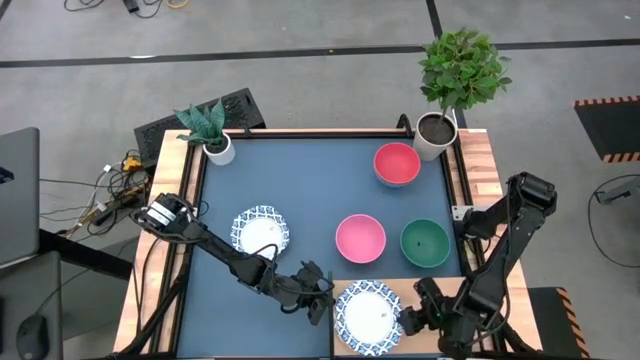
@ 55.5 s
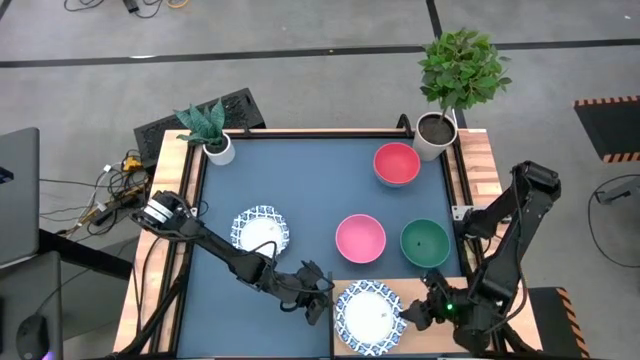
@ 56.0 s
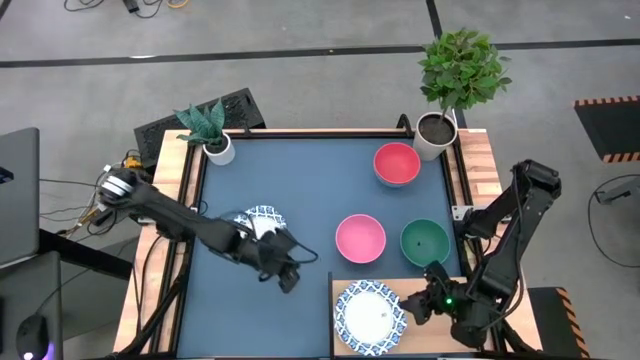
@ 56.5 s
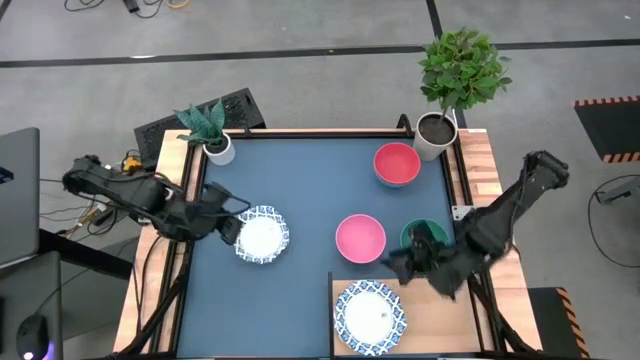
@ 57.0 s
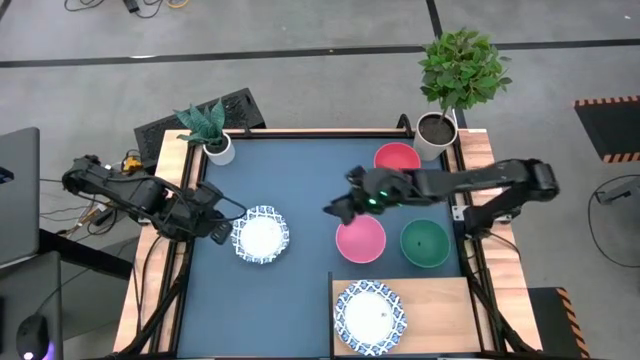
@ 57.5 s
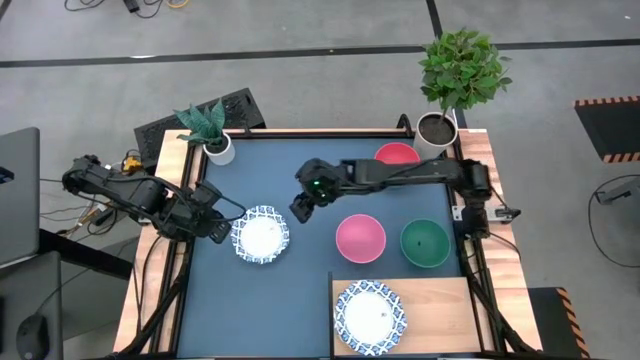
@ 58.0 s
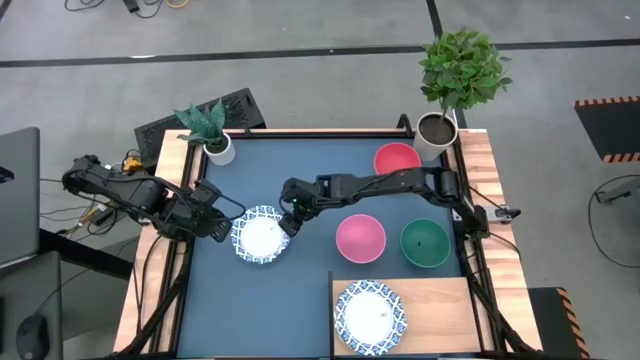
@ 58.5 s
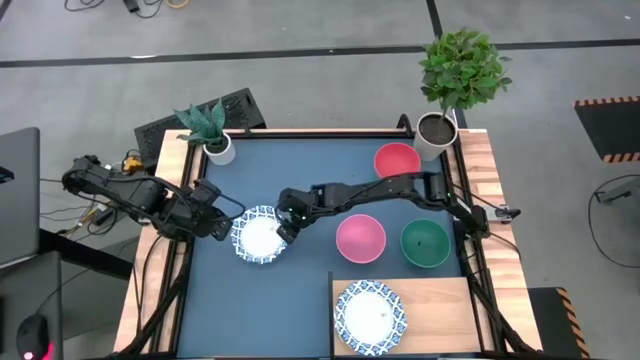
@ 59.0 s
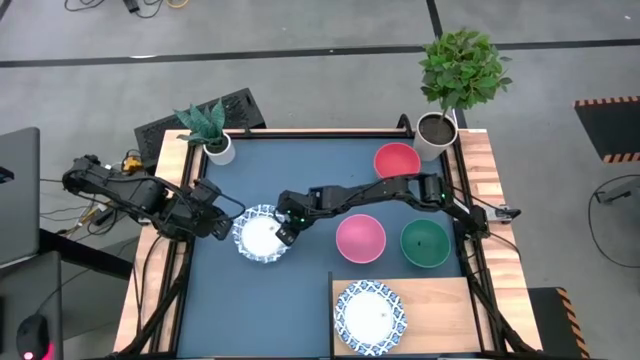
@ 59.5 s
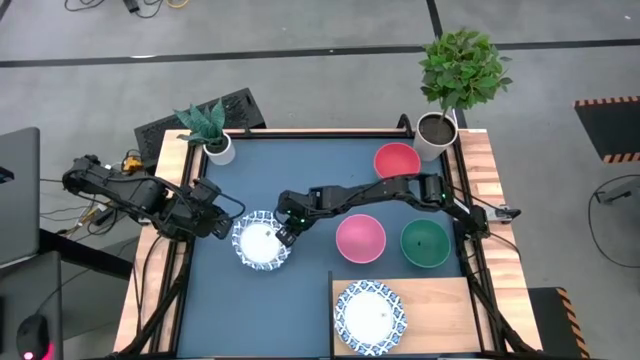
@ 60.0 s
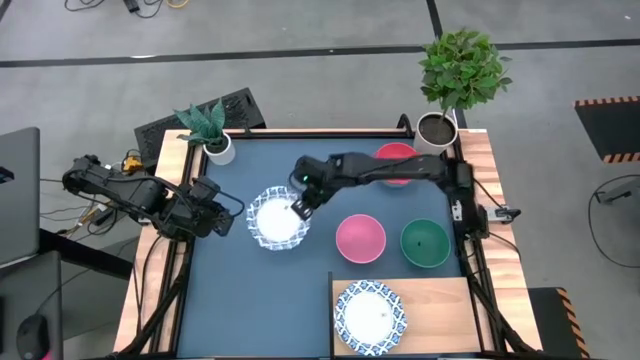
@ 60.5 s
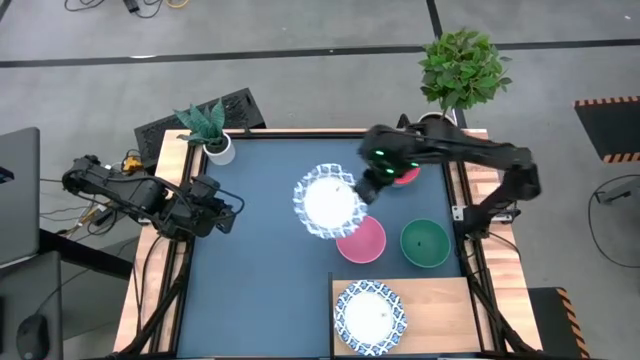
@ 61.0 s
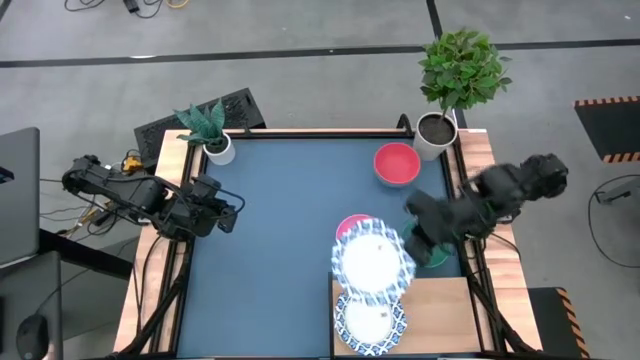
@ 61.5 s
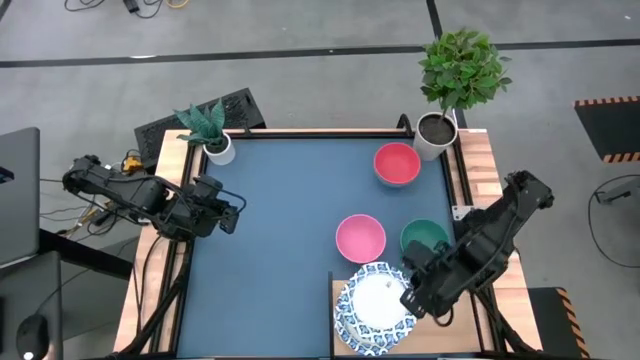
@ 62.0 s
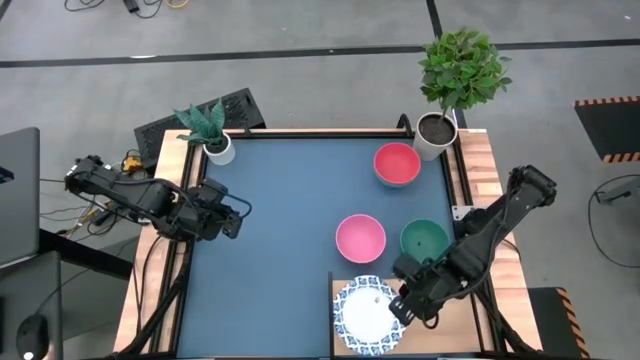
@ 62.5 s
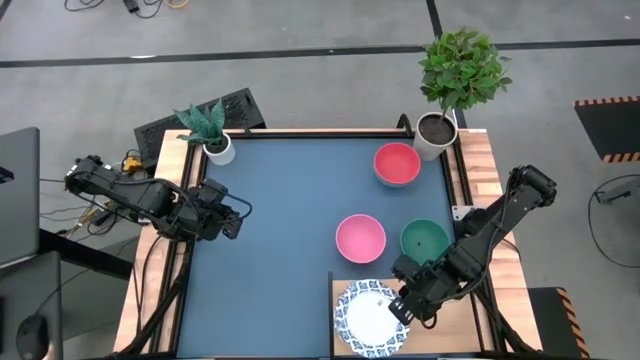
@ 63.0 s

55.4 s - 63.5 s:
Task: Place and stack bowls onto a shelf
Stack the white patterned bowl on the white patterned bowl on the shelf

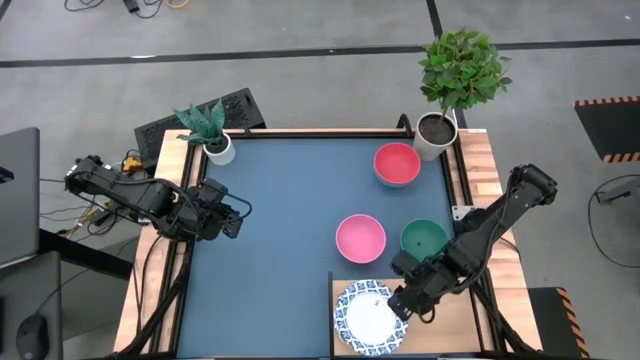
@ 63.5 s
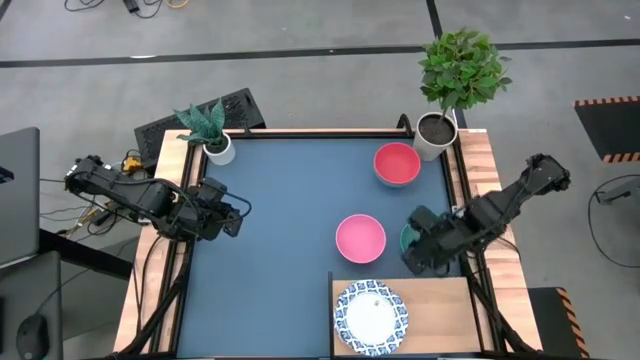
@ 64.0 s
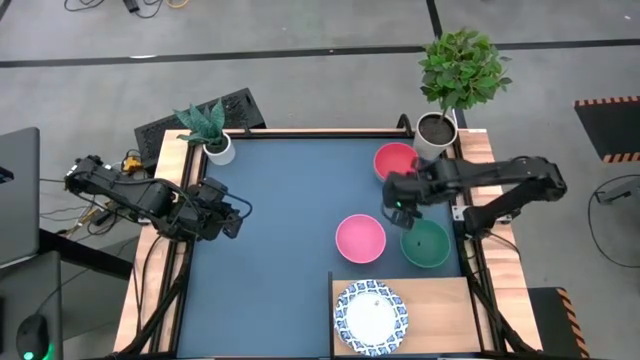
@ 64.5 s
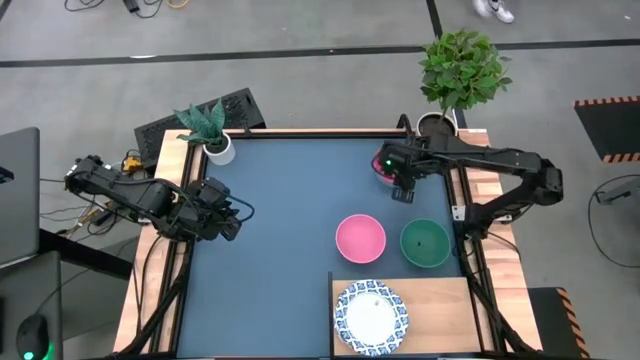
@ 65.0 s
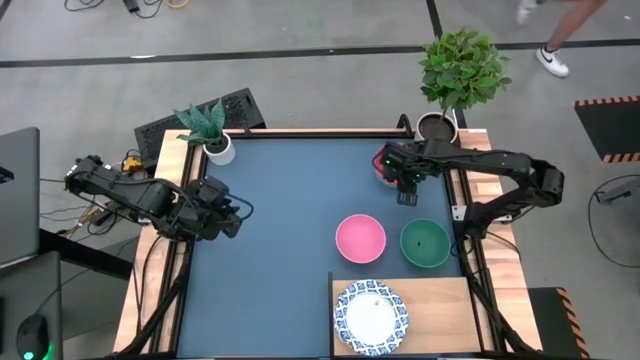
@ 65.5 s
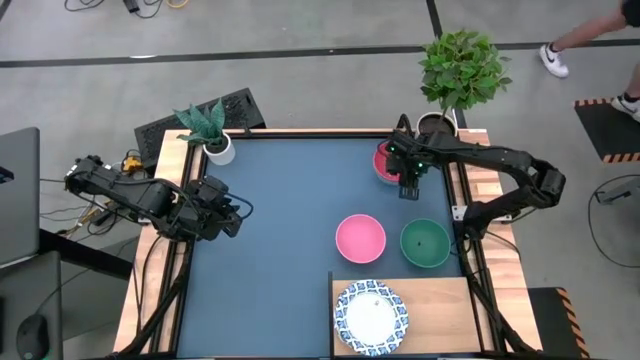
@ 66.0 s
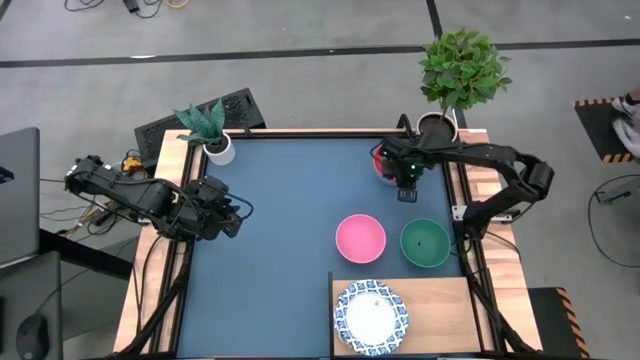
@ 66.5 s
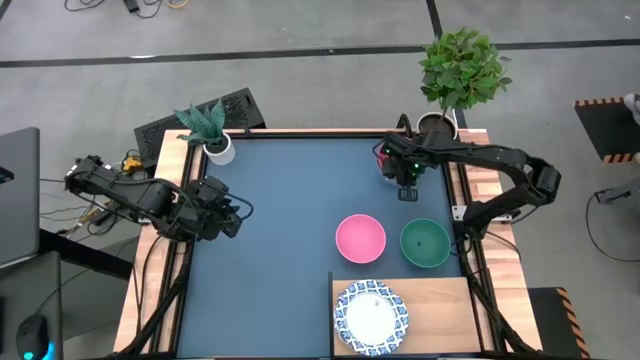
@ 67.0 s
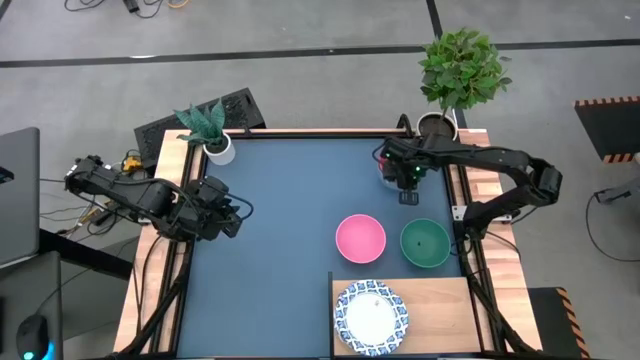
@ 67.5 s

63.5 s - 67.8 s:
Put the orange bowl on the shelf

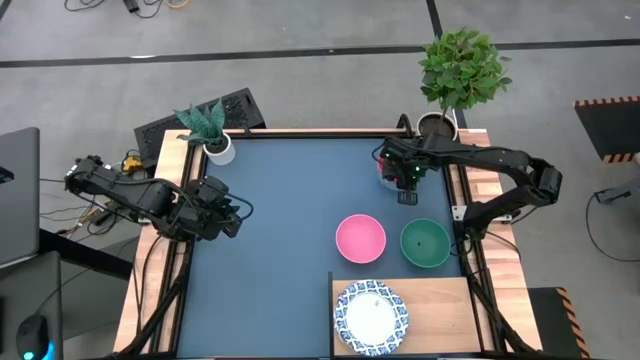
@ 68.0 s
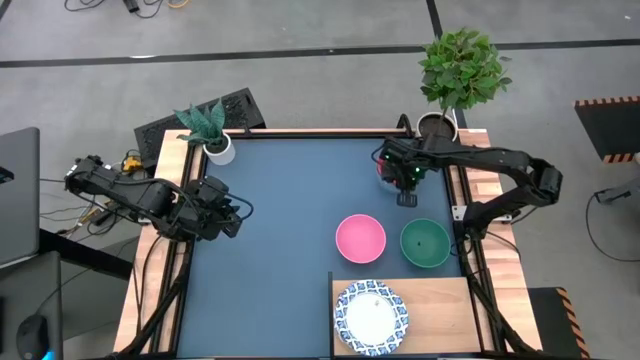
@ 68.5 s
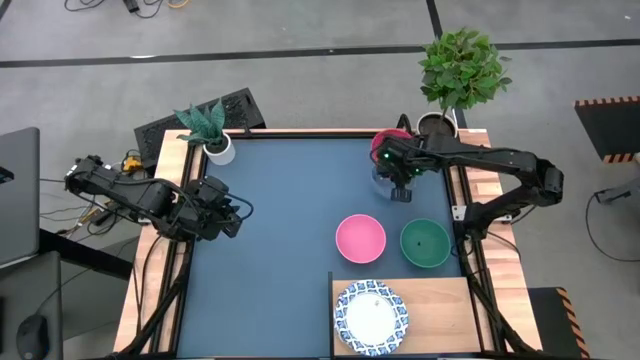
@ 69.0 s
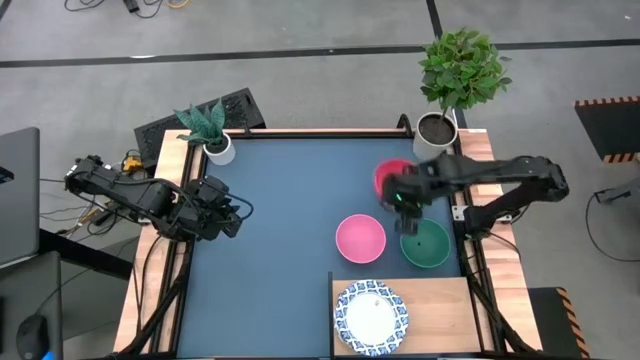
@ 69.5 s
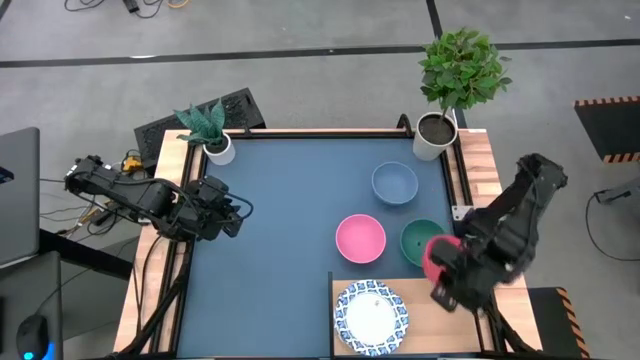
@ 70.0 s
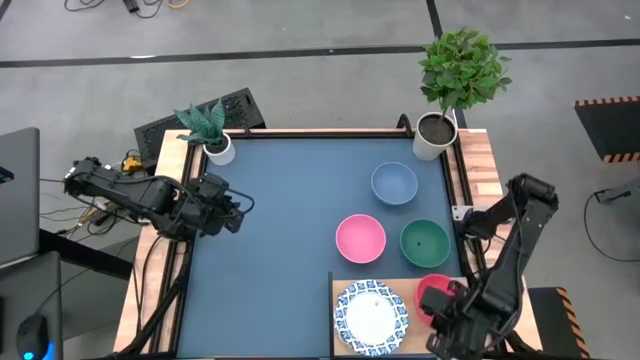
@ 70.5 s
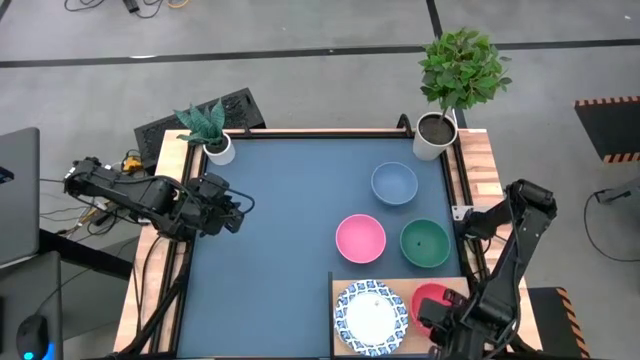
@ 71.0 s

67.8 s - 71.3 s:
Put the orange bowl on the shelf

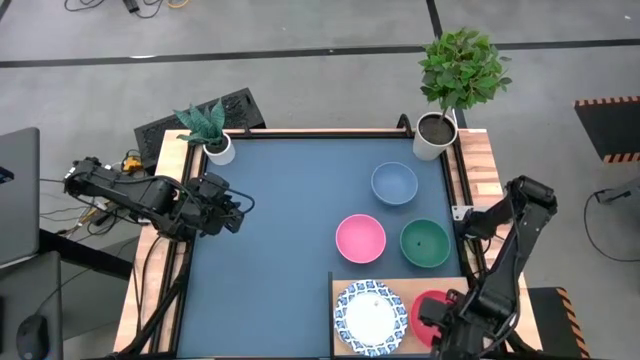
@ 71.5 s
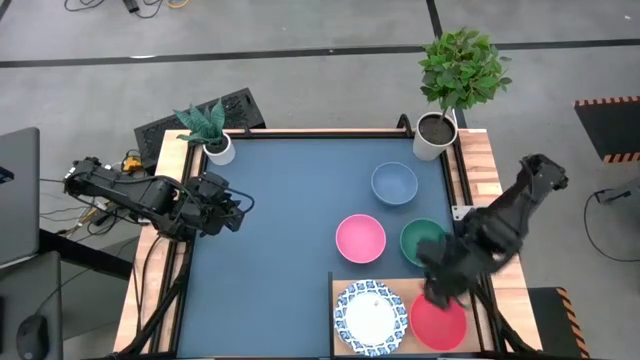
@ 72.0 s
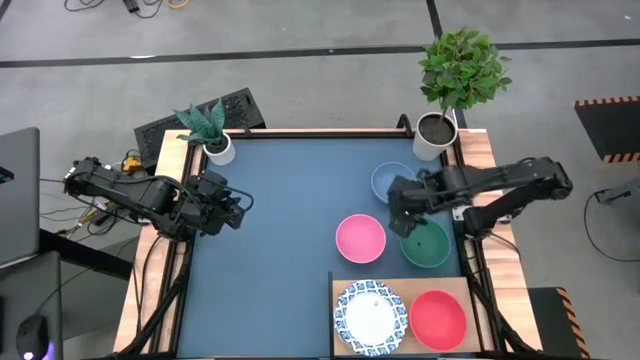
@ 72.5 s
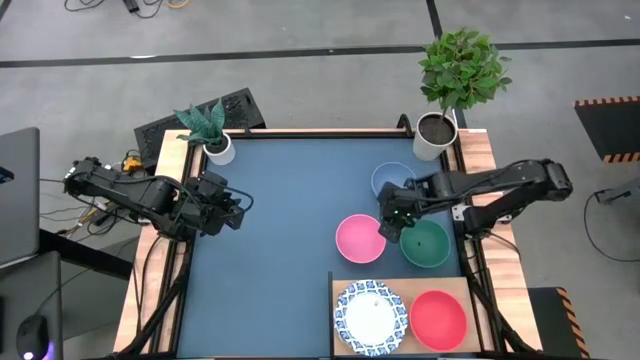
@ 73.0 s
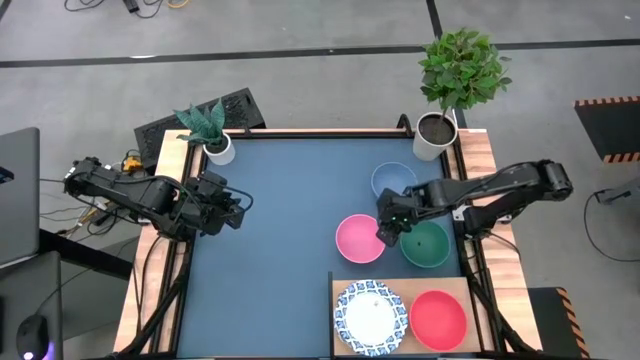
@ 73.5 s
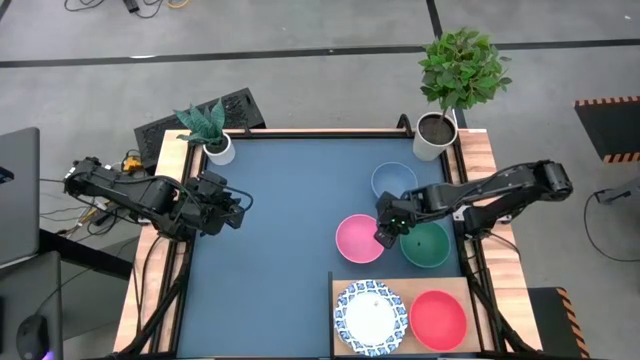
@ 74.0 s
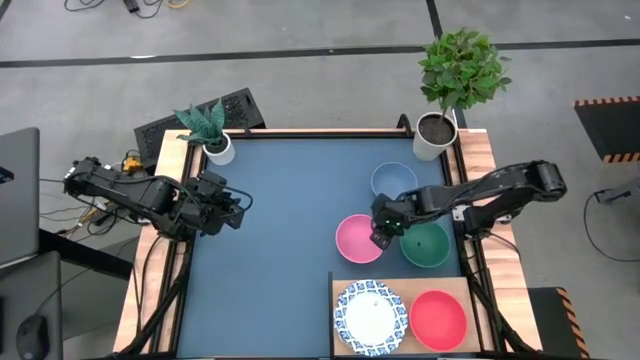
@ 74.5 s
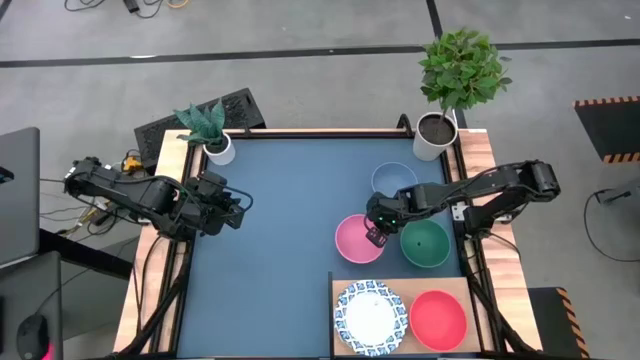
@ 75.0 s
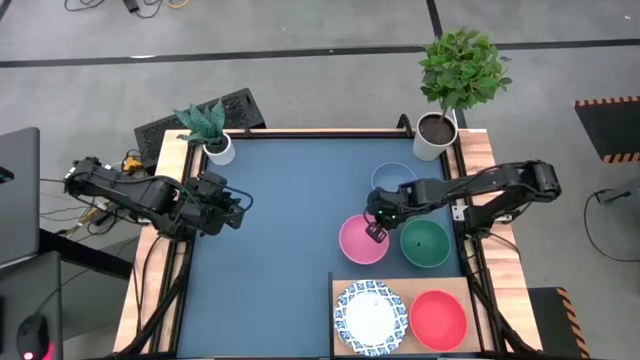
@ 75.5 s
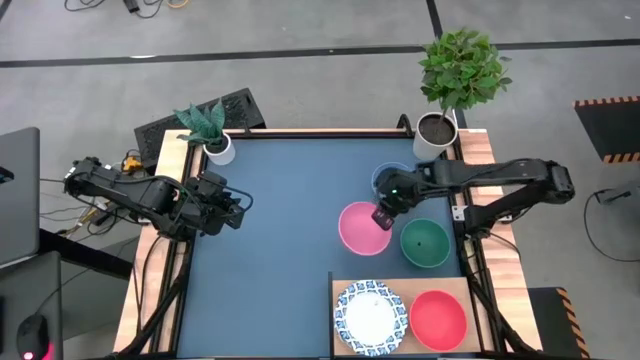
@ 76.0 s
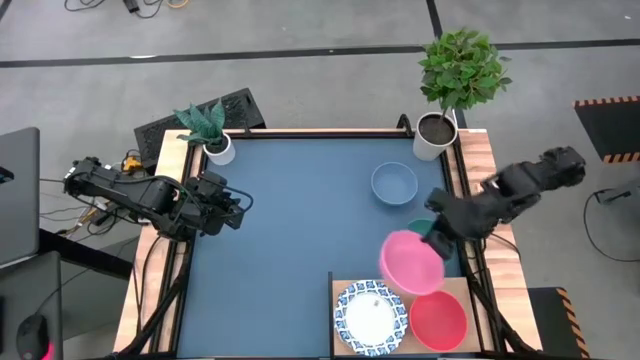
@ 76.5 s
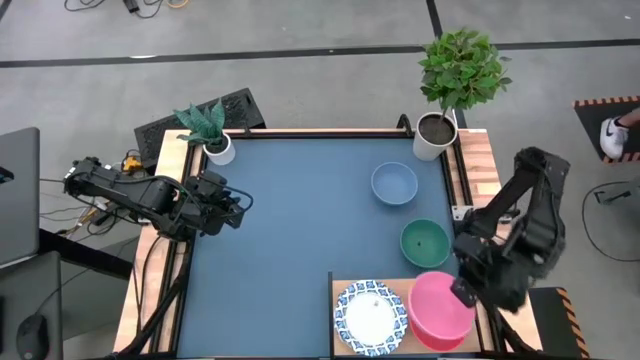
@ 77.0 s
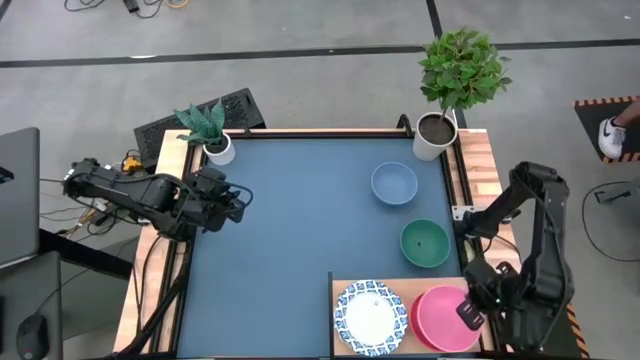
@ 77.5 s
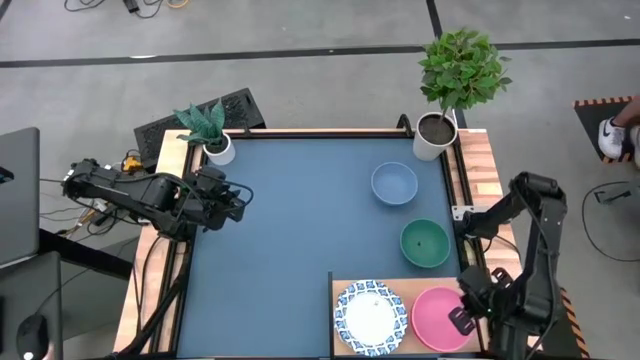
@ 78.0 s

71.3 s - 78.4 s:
Stack the pink bowl on the orange bowl on the shelf
